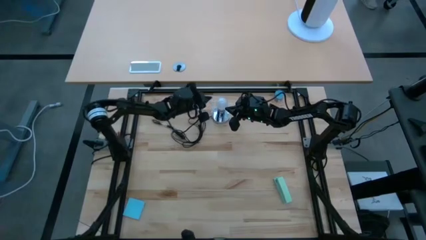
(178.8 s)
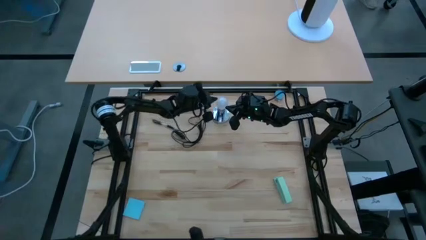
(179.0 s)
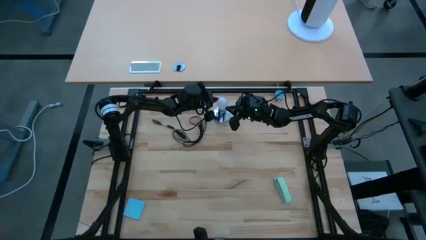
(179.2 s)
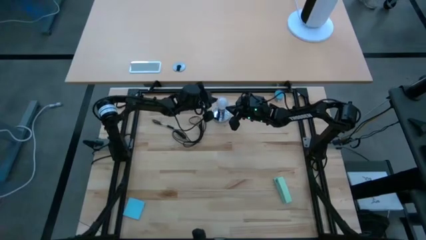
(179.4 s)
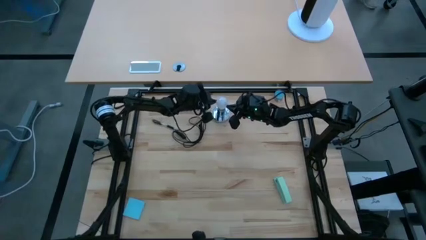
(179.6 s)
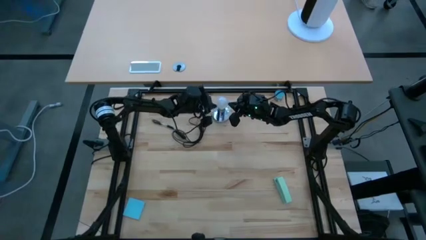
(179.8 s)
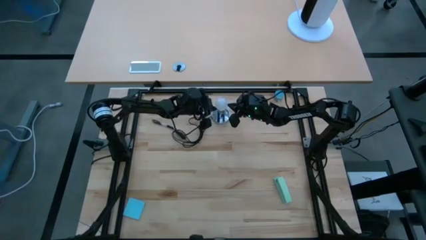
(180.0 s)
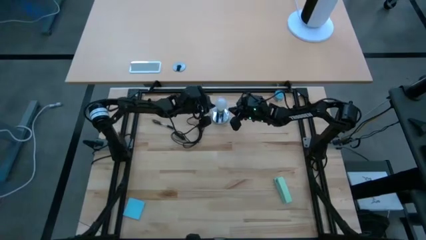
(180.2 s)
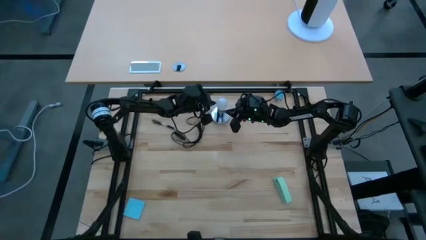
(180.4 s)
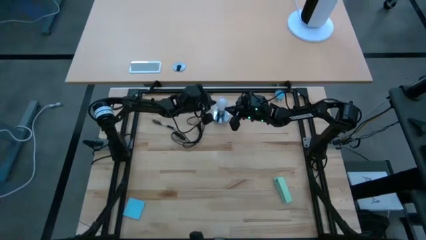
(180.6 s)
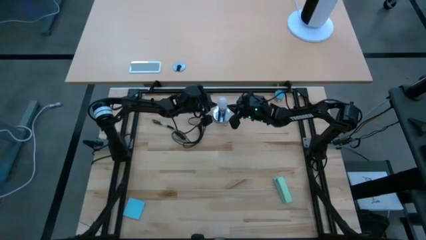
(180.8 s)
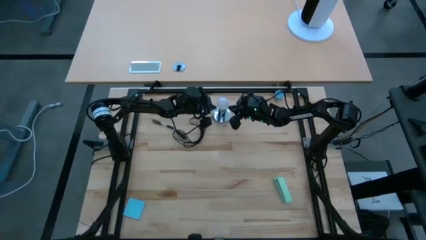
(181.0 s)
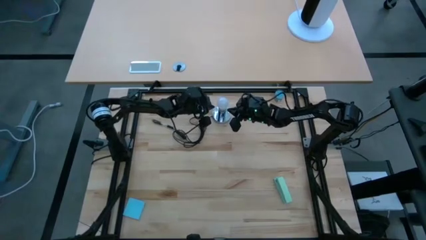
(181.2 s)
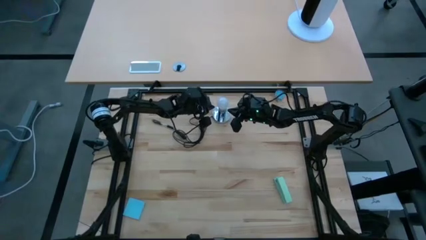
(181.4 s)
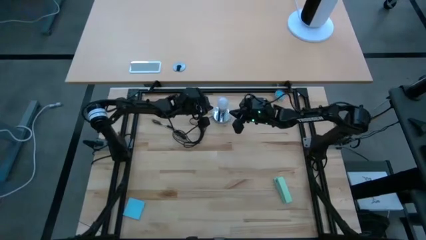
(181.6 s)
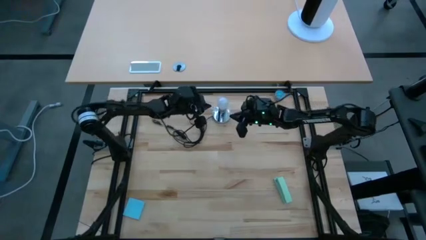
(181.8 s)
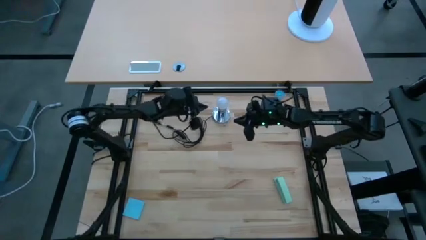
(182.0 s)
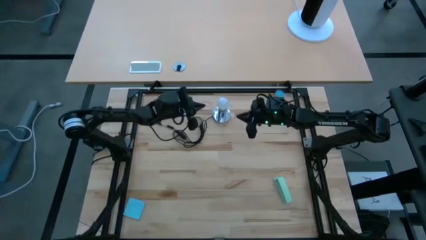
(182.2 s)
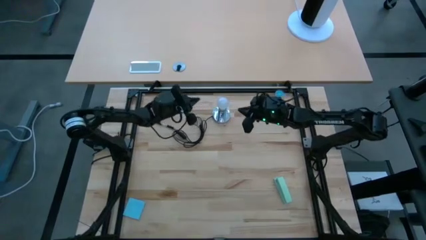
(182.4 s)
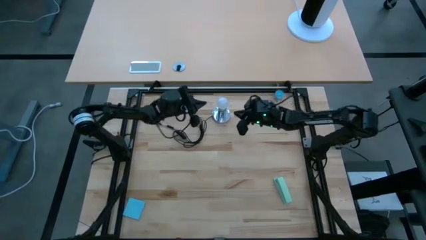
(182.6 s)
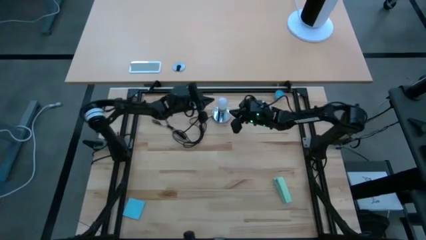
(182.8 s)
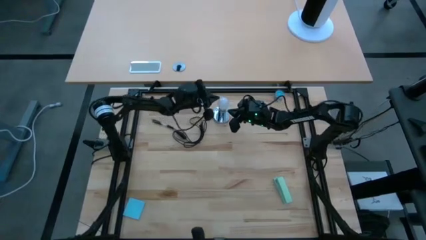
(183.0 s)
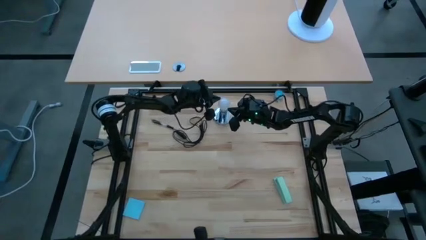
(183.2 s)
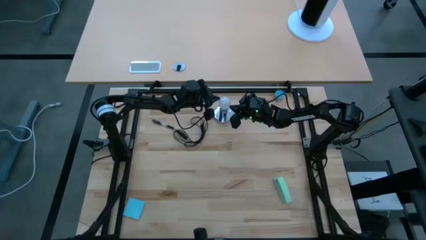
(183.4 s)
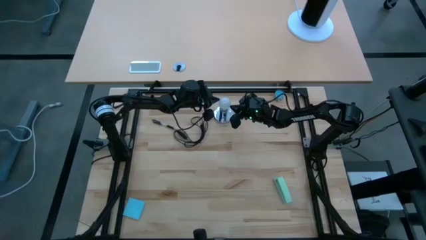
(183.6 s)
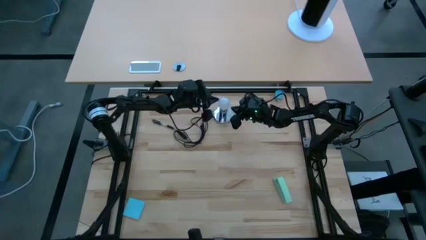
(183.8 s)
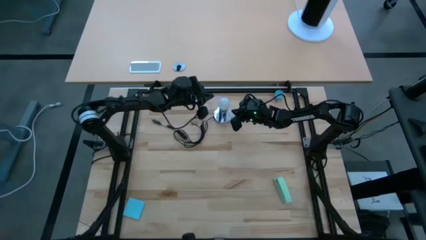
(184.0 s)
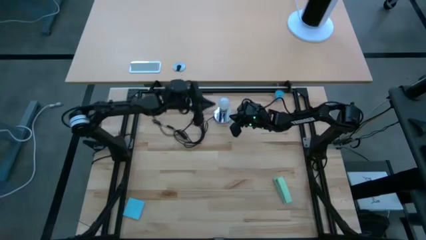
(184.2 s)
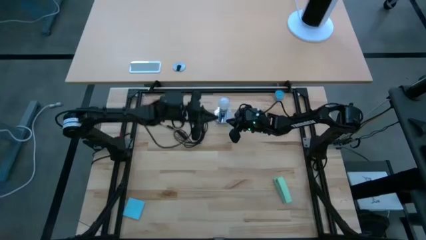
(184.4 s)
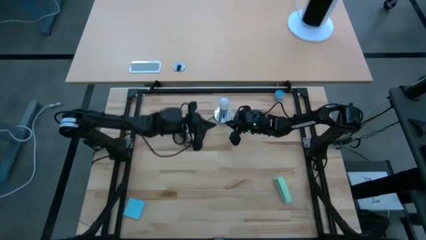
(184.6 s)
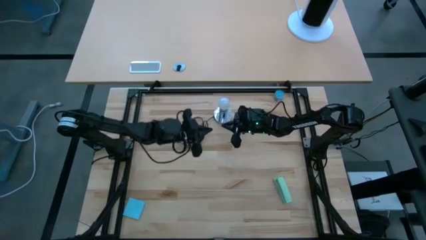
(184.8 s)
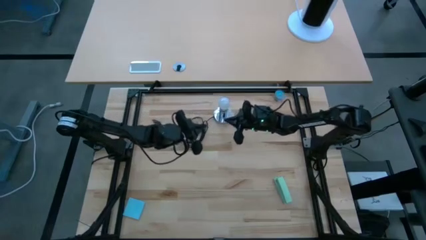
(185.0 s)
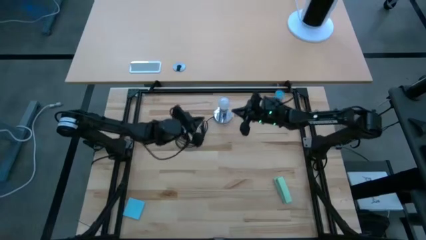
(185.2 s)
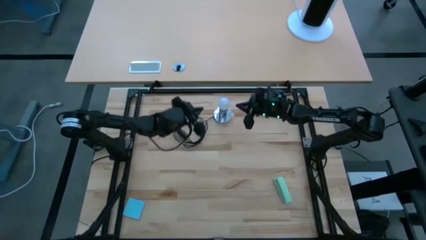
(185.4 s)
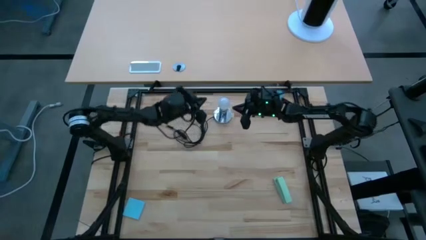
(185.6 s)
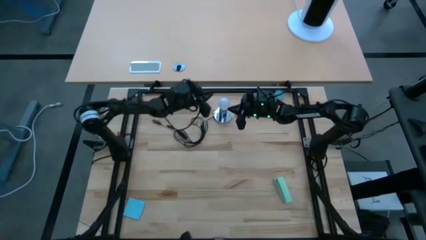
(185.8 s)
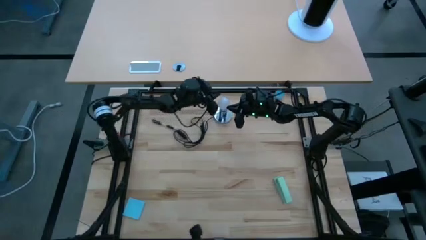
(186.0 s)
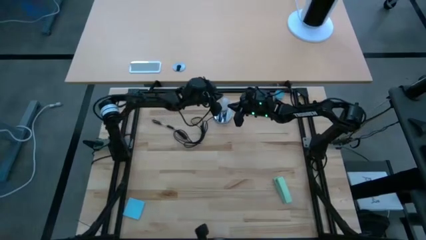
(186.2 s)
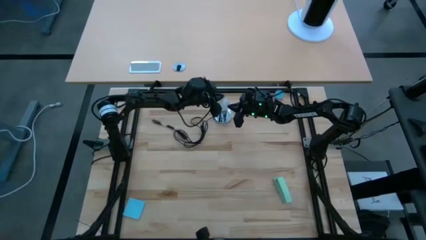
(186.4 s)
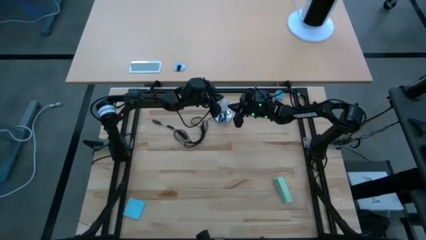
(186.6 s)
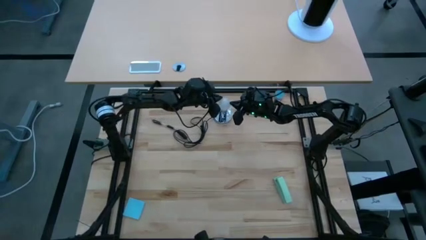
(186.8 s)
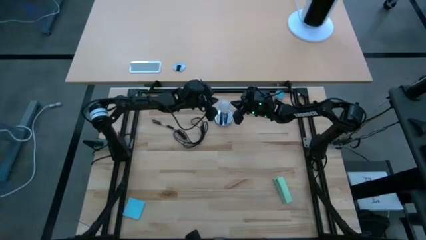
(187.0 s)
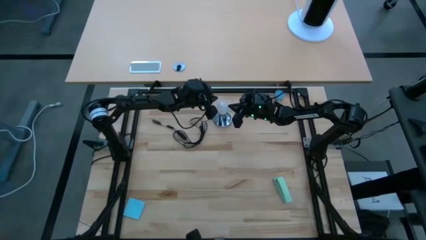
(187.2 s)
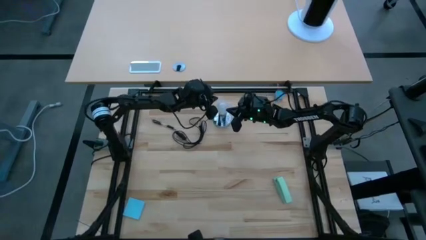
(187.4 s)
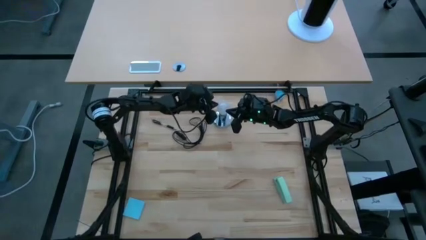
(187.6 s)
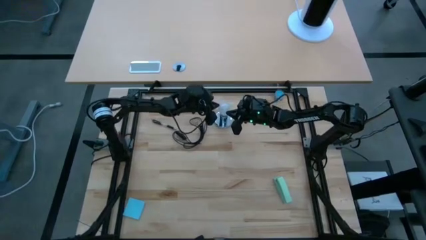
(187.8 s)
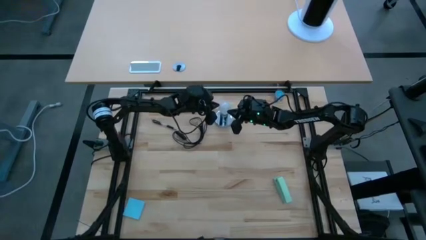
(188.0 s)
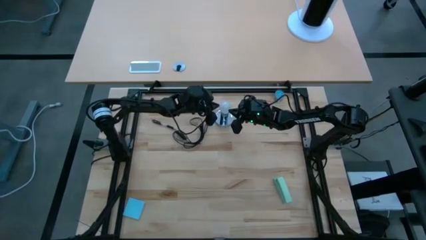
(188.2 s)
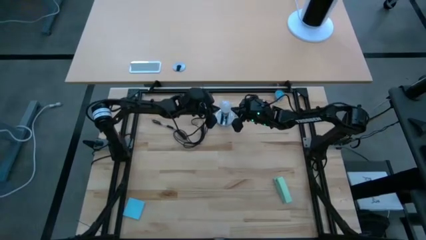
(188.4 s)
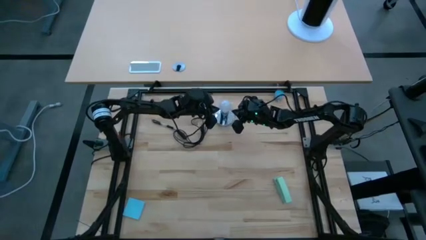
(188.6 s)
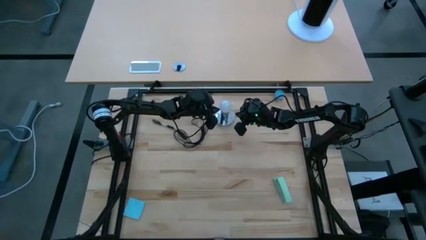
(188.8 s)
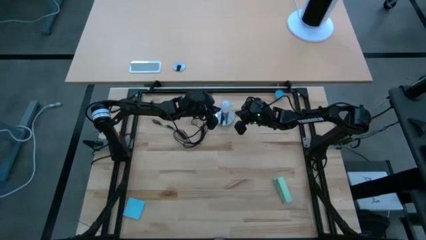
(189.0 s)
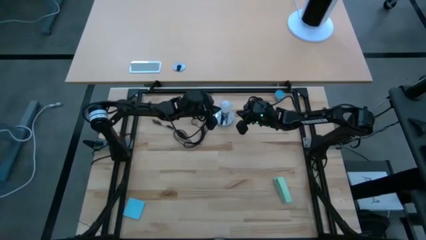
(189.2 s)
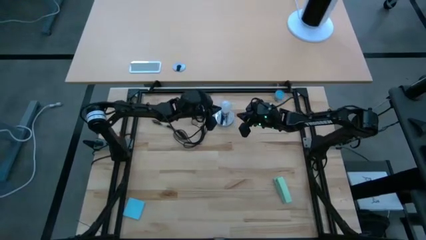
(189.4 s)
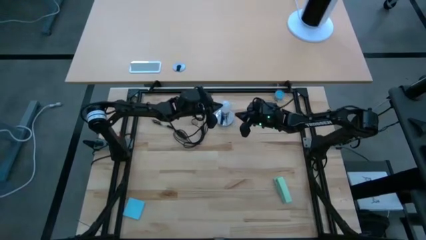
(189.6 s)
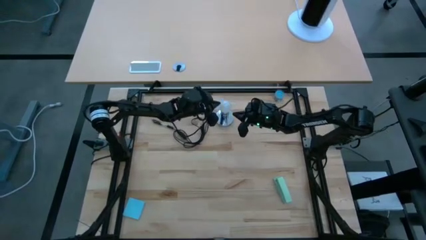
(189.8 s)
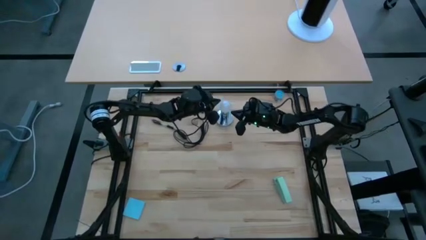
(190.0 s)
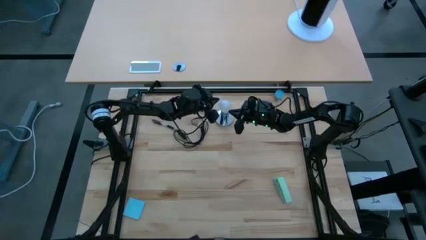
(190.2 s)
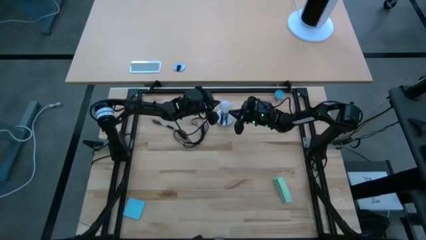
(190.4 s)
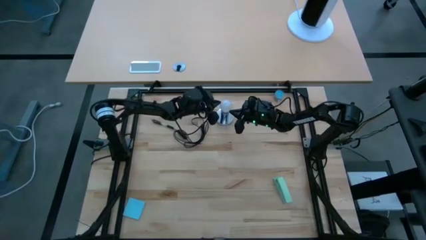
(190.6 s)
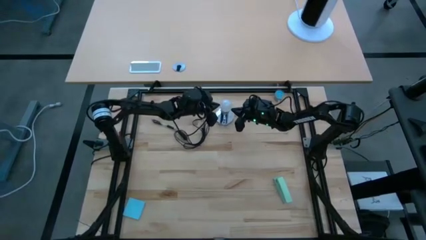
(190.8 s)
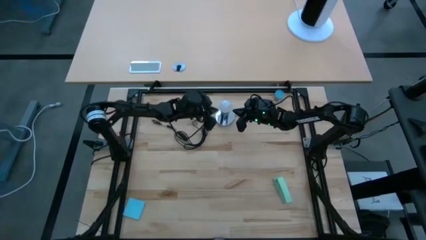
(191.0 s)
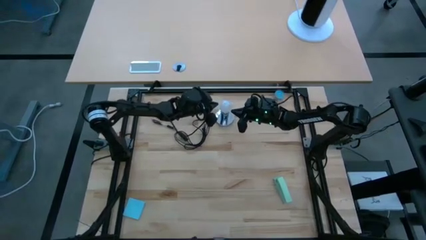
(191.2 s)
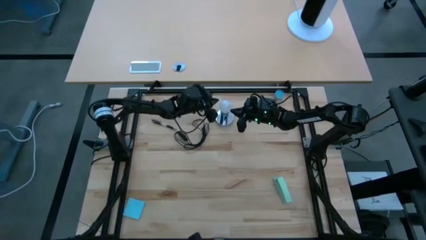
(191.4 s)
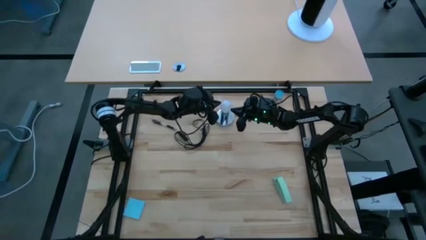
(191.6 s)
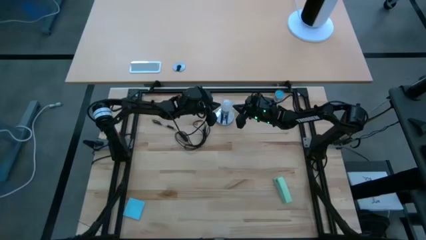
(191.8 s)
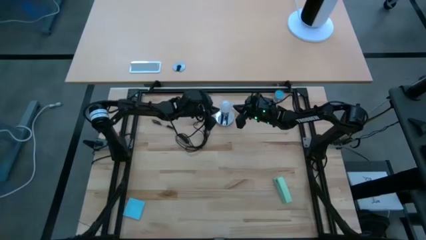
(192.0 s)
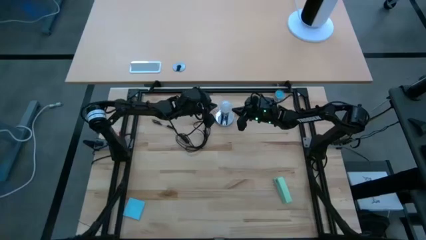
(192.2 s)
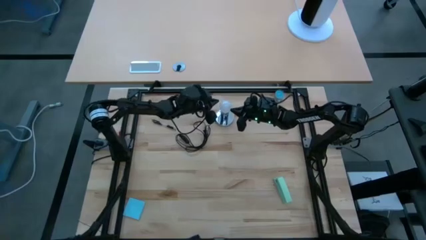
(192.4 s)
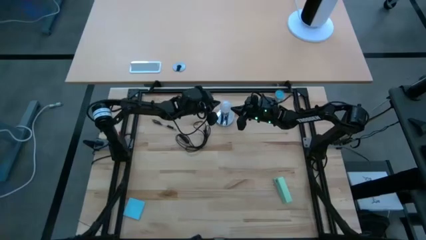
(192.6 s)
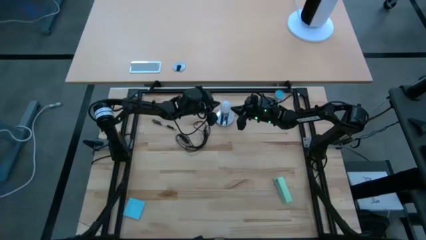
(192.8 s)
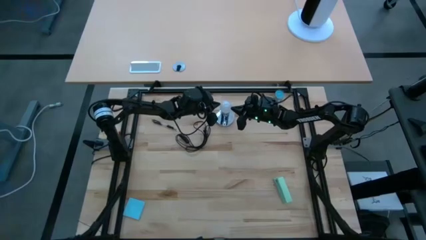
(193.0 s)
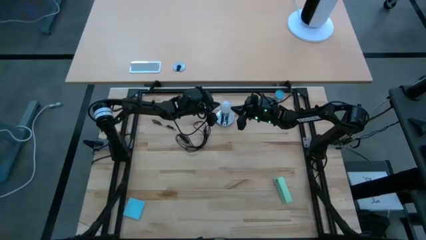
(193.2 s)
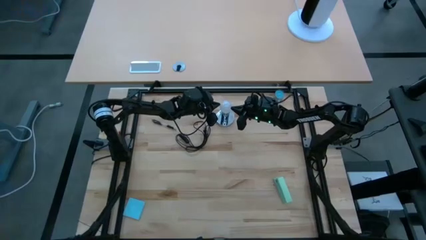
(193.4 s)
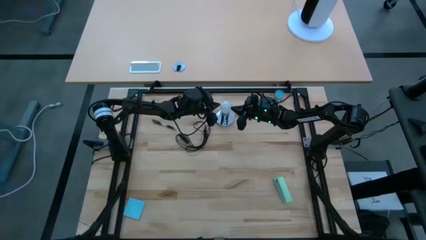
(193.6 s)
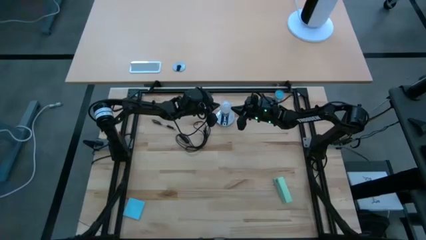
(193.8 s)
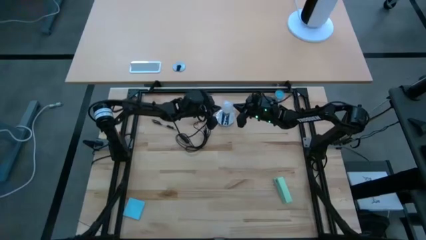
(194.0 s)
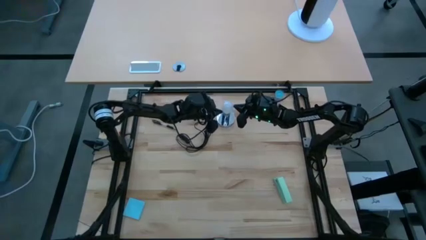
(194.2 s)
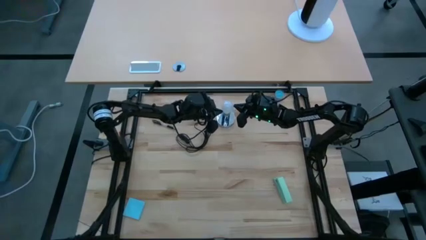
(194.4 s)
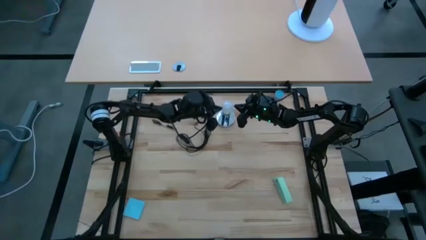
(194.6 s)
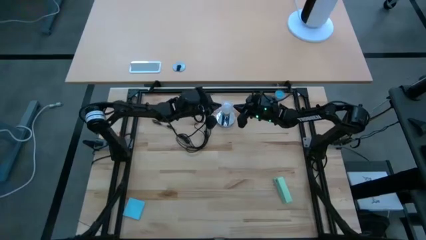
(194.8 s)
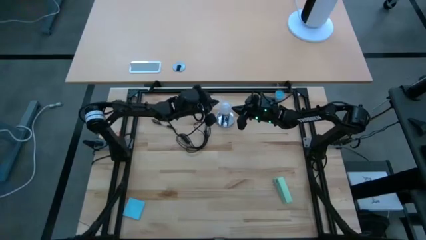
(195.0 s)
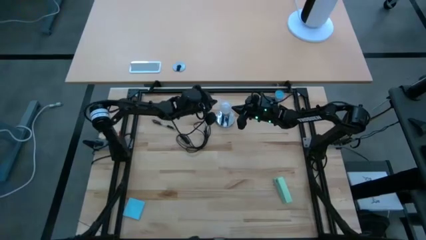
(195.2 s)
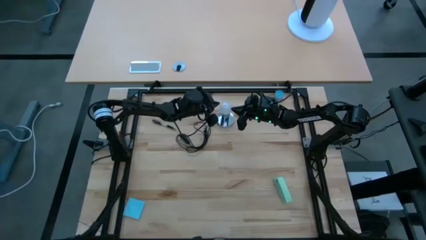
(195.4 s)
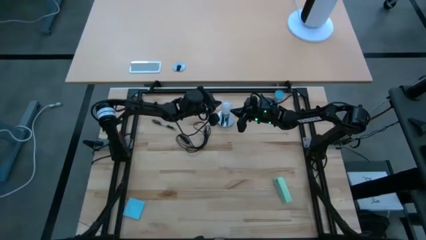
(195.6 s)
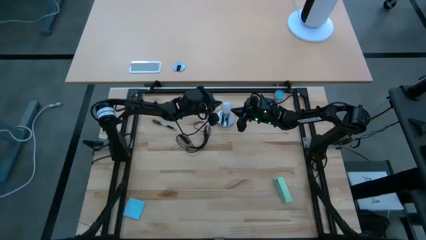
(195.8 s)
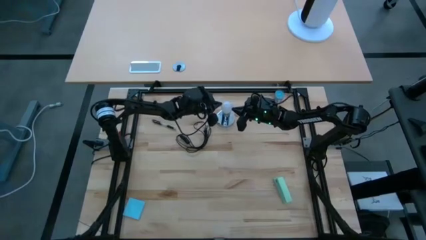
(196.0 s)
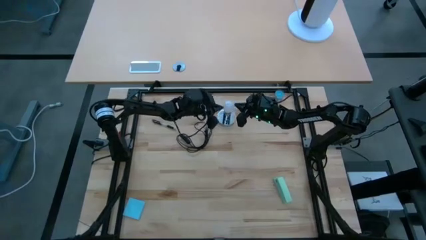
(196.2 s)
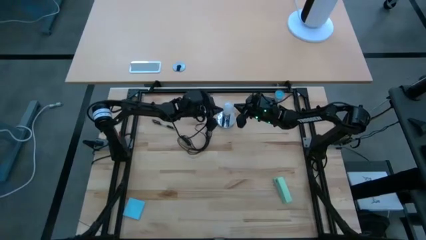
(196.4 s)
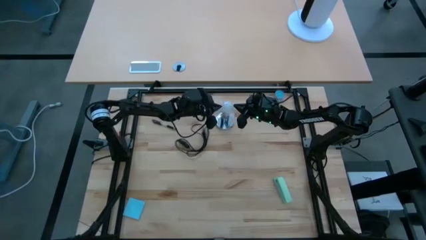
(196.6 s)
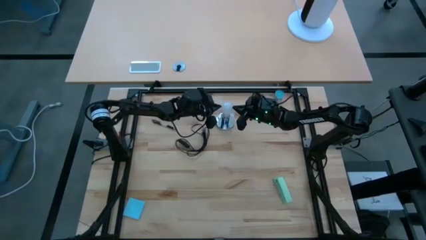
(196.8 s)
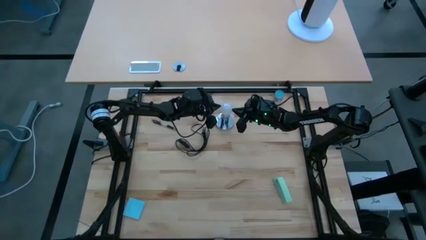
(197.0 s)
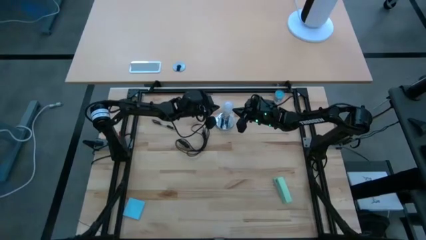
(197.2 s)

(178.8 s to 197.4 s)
Task: Screw lightbulb
Remove the lightbulb from the lamp
